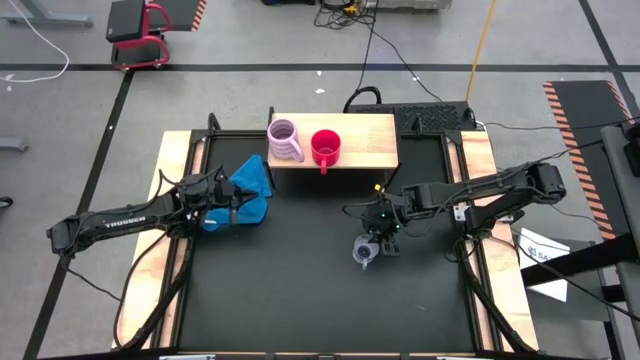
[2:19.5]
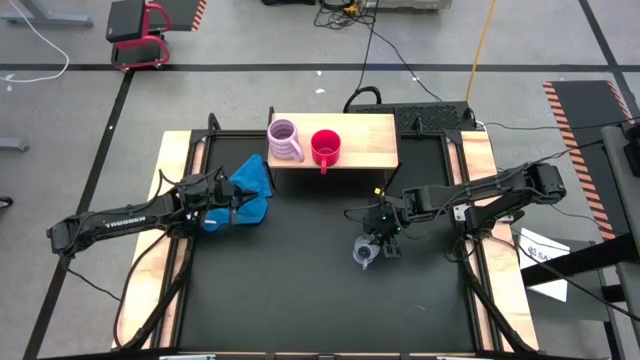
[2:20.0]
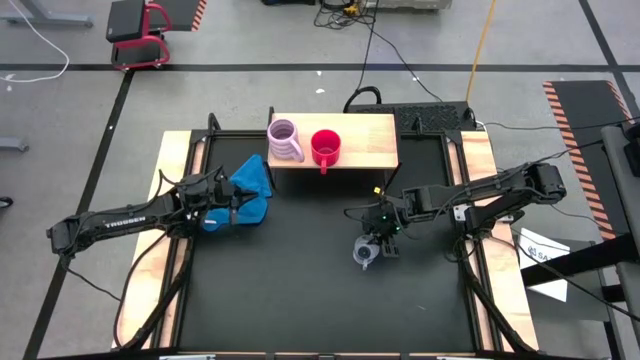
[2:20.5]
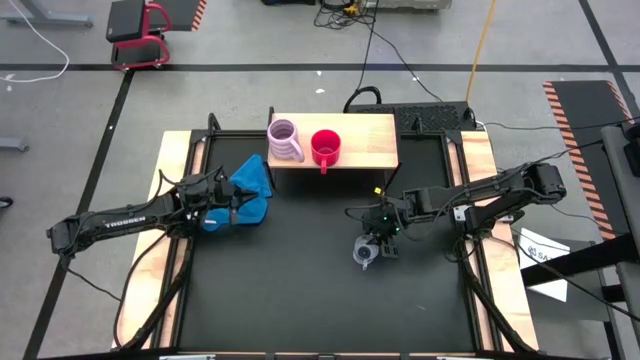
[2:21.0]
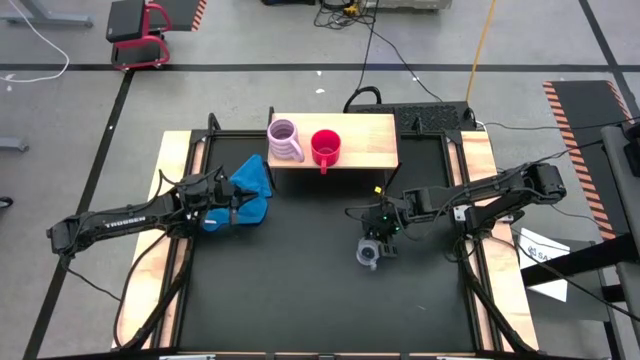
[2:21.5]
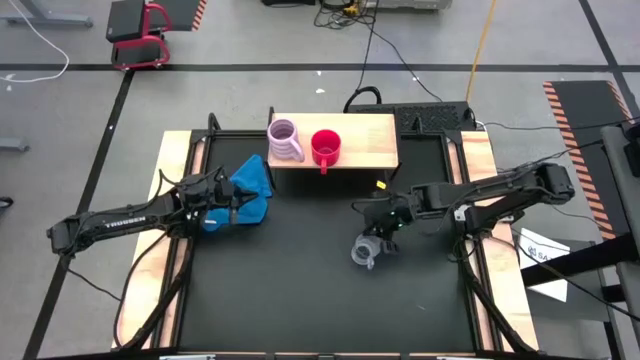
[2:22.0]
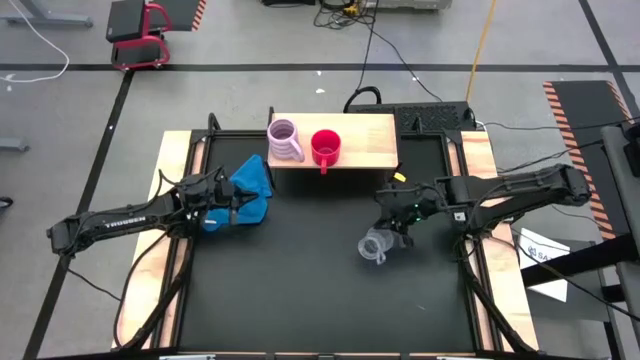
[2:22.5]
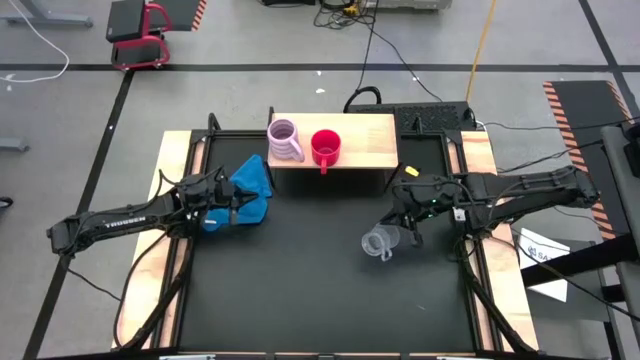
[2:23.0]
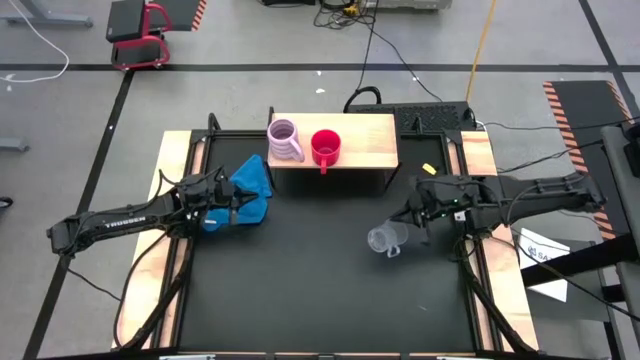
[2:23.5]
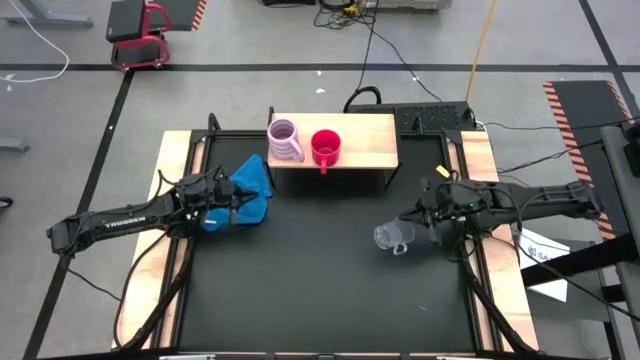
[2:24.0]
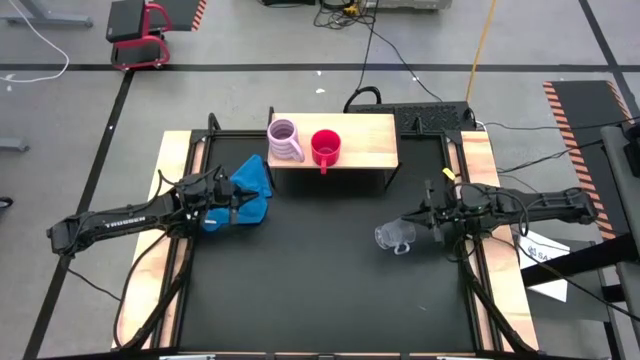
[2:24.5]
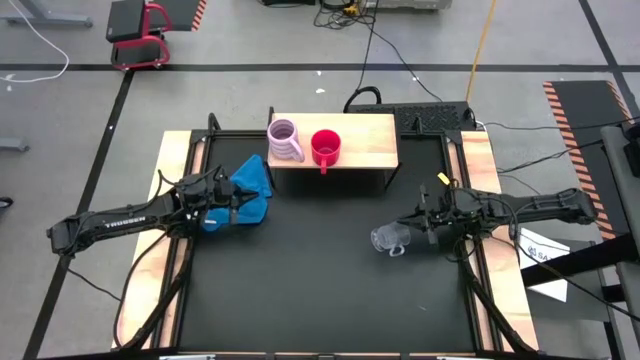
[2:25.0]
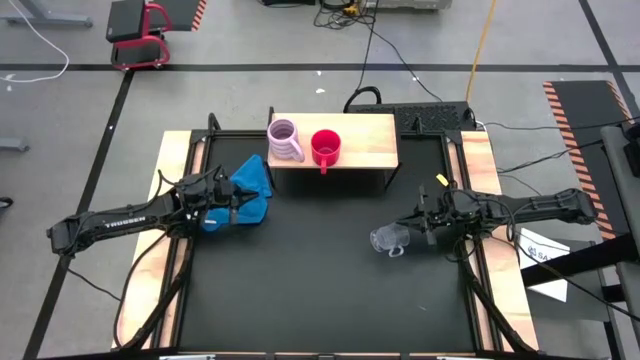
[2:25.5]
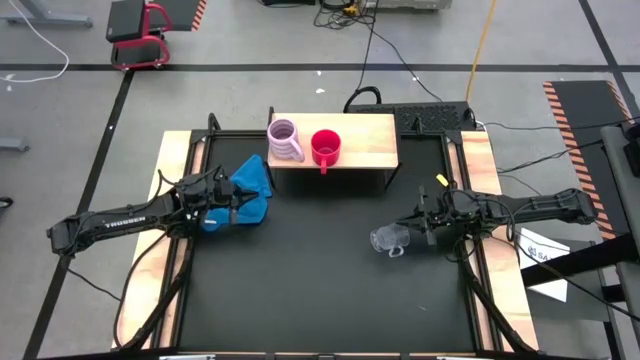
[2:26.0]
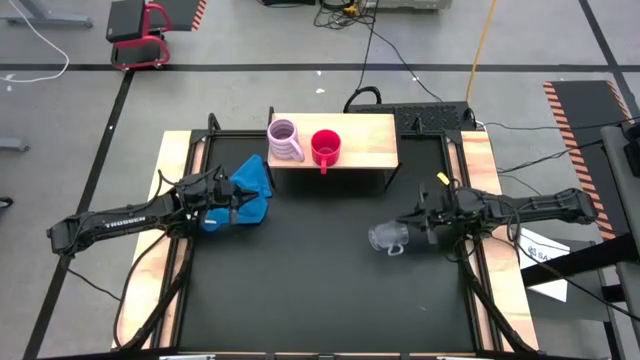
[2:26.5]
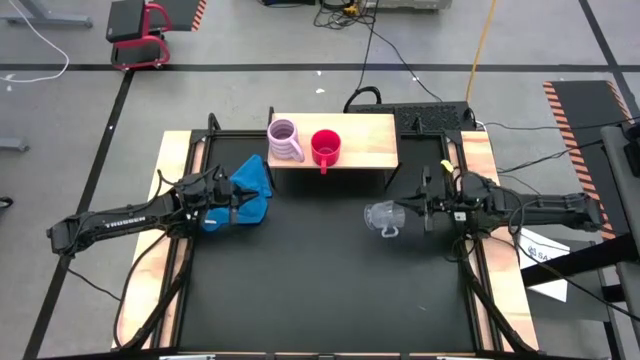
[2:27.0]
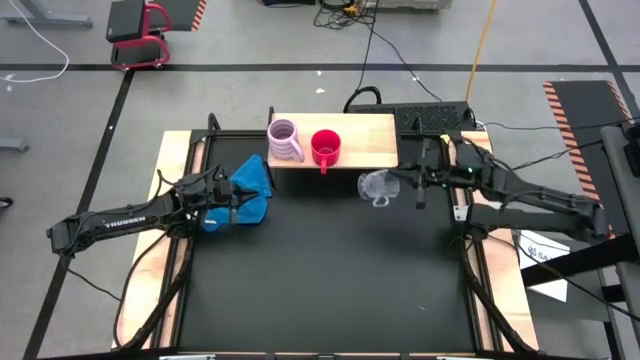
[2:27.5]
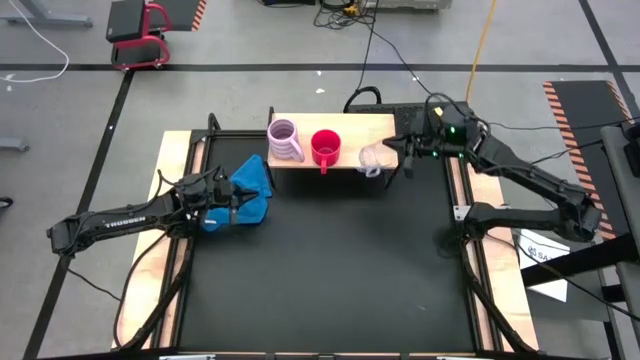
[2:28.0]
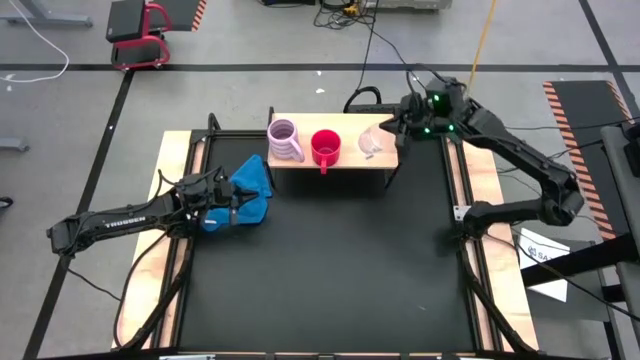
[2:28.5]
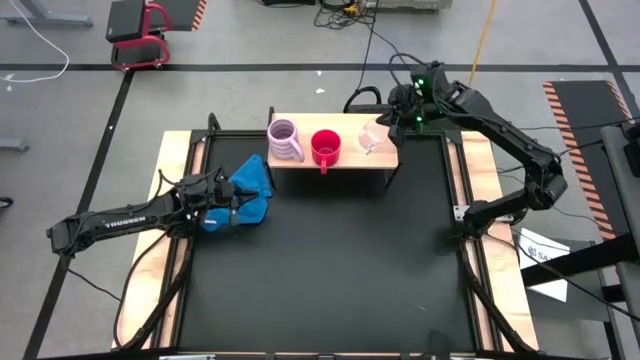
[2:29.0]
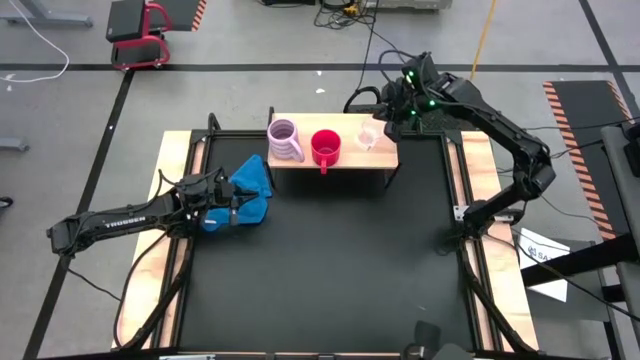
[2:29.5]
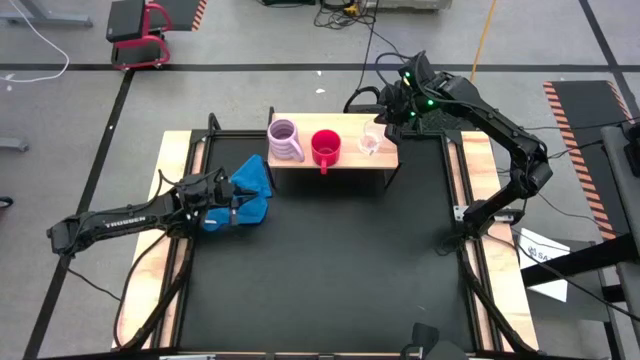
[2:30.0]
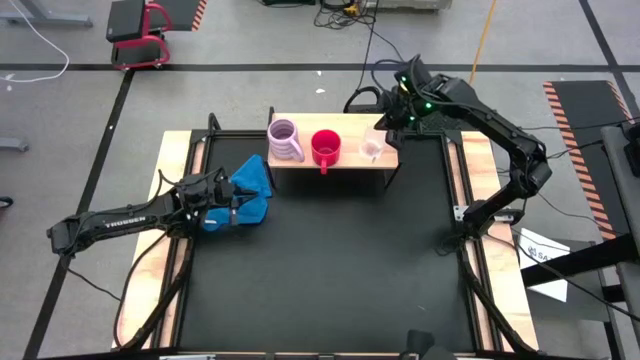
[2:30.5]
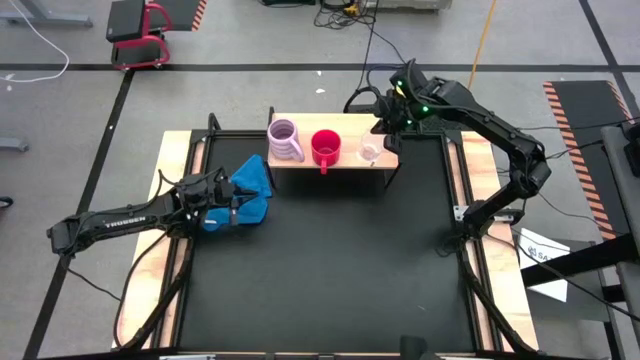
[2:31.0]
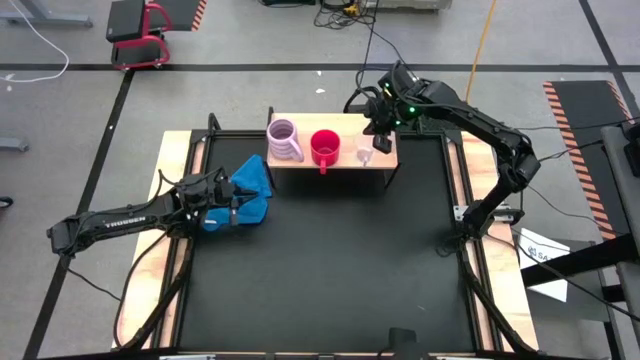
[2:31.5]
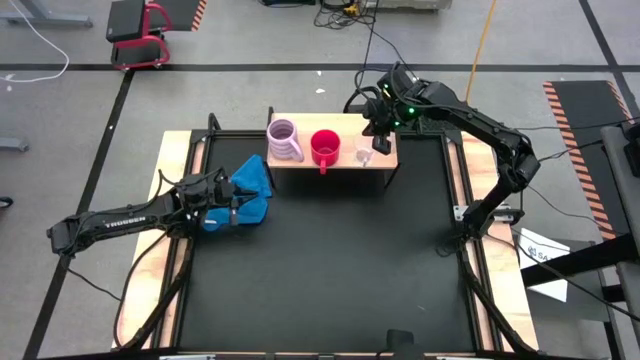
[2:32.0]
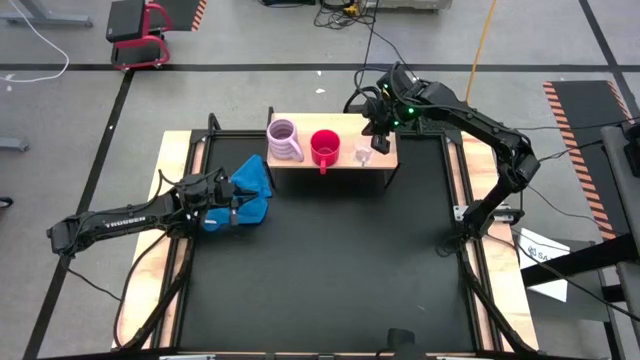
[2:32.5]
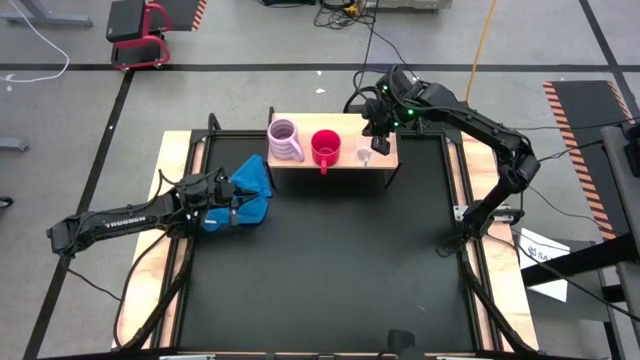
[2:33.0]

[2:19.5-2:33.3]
Task: Stack small to large cups/mugs on shelf
Put the transparent mug on the shelf

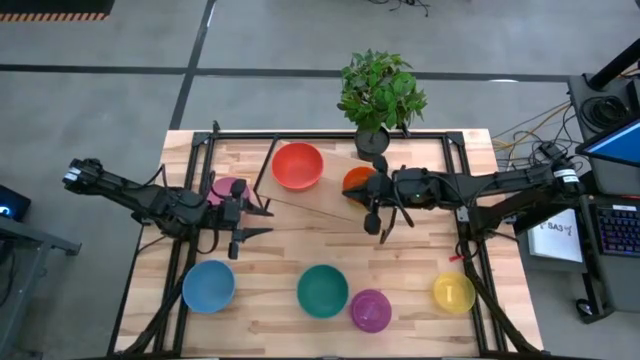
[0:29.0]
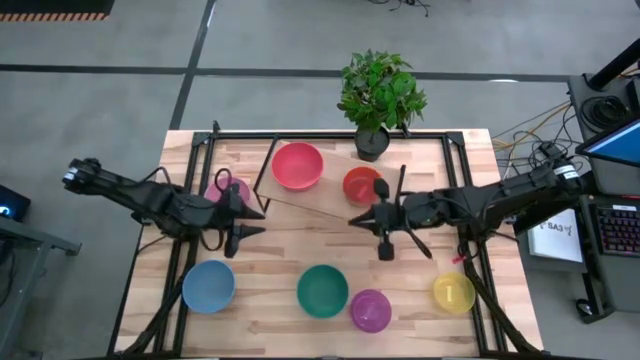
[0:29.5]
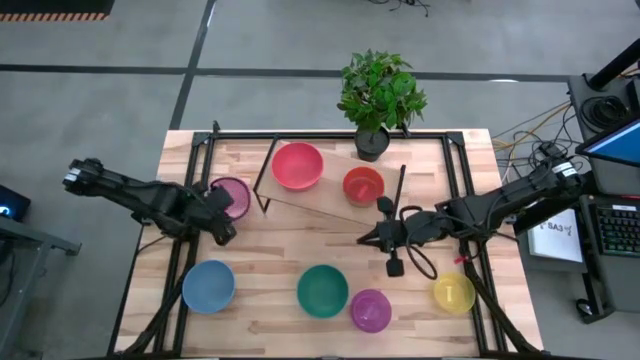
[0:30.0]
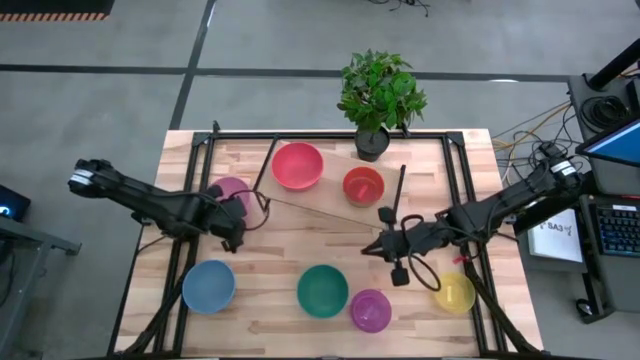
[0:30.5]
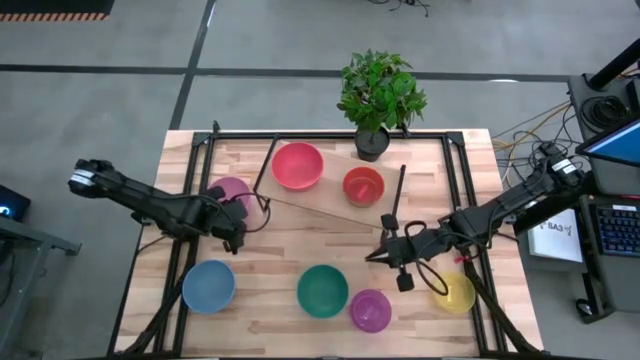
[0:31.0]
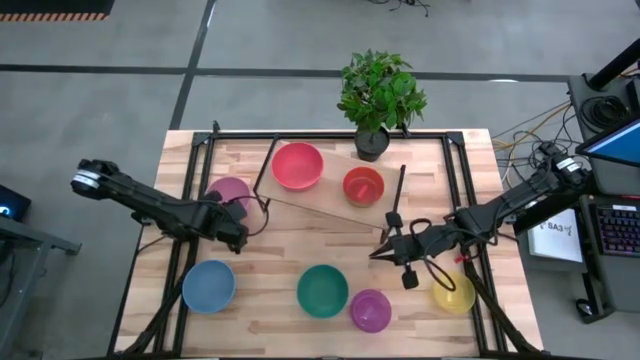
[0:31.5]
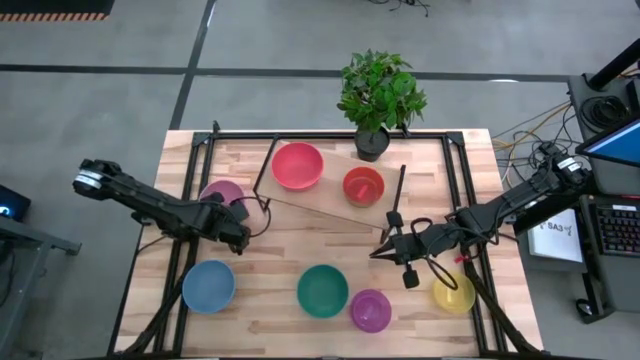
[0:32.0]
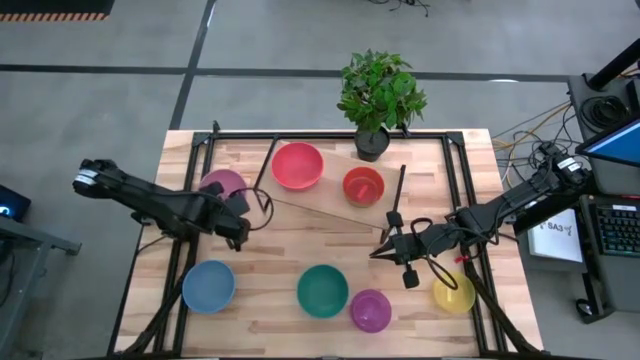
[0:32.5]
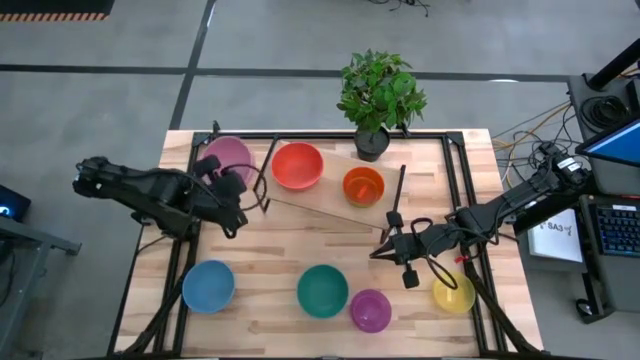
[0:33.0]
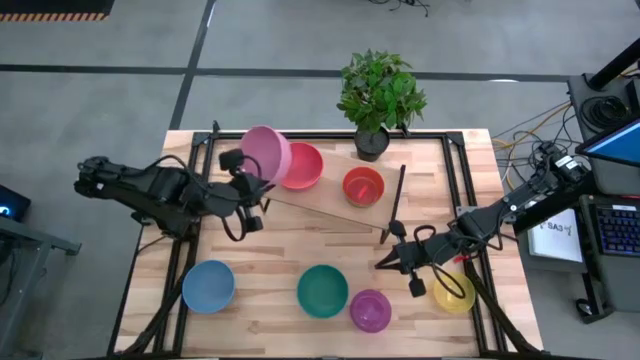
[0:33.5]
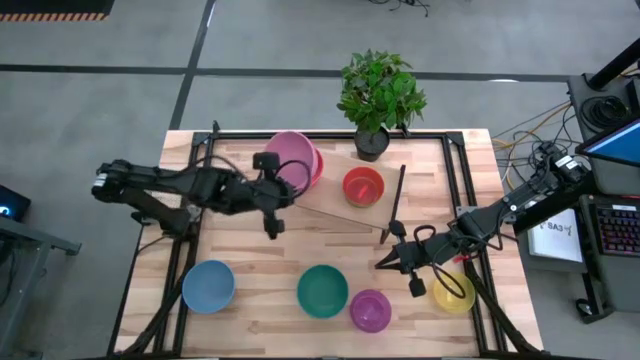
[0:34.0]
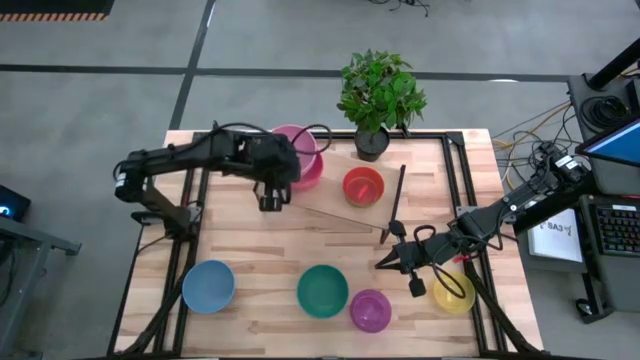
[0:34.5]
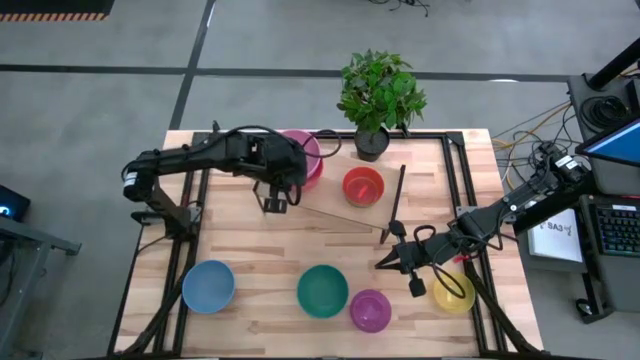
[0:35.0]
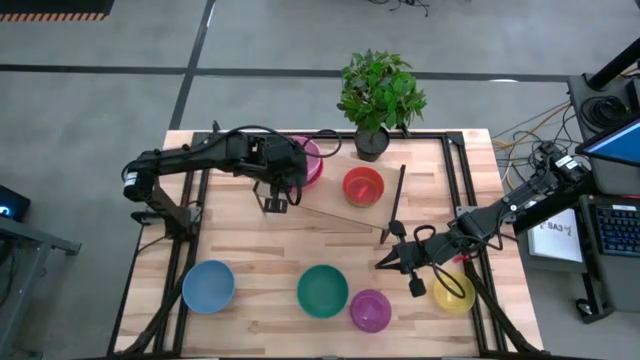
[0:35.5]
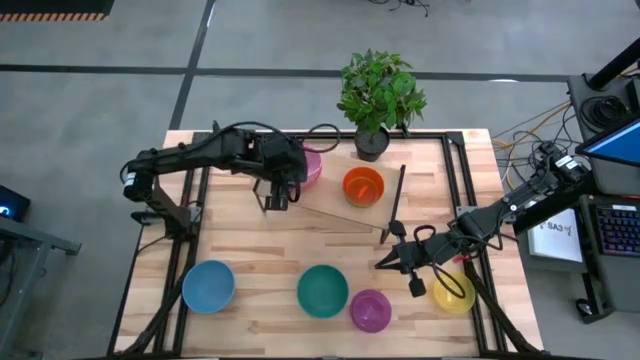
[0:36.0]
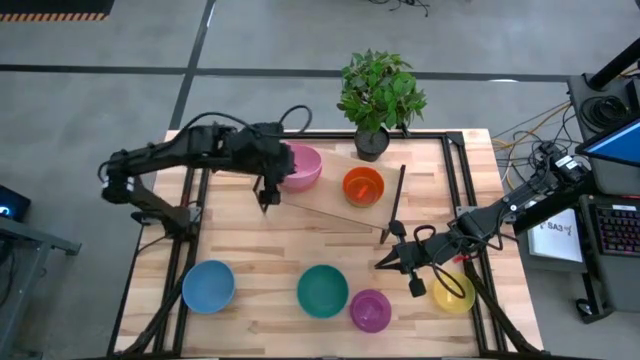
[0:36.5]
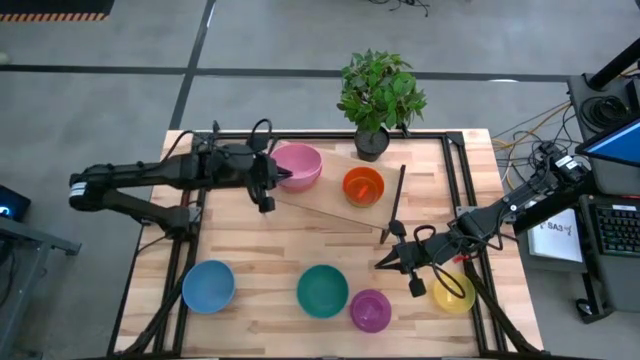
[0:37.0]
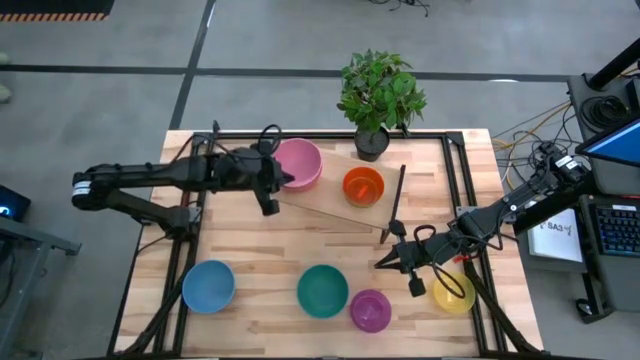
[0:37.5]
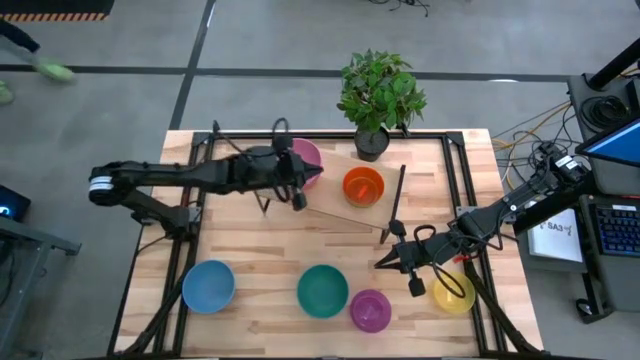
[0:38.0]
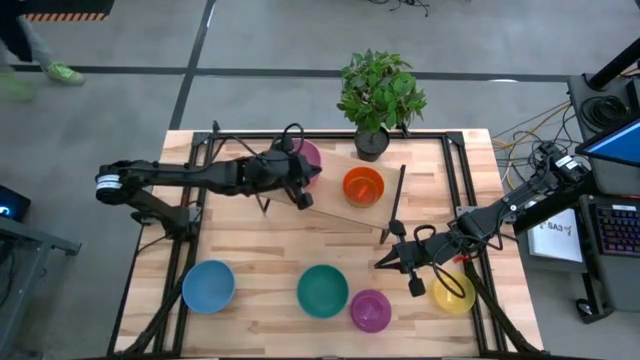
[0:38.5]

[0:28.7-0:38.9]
Task: Place and stack bowls onto a shelf
Stack the pink bowl on top of the orange bowl on the shelf
